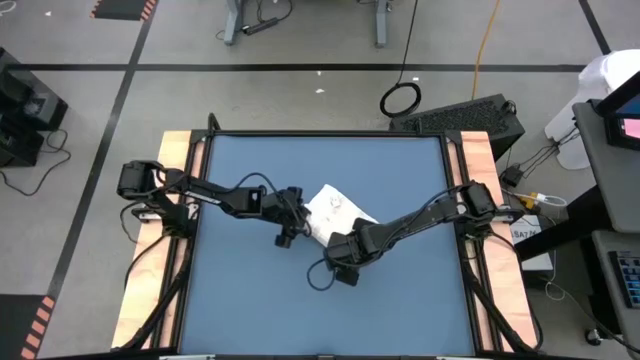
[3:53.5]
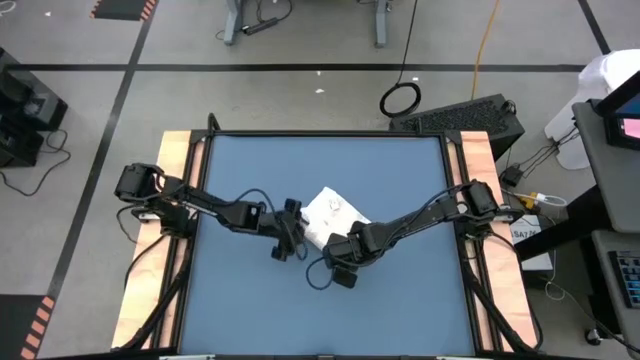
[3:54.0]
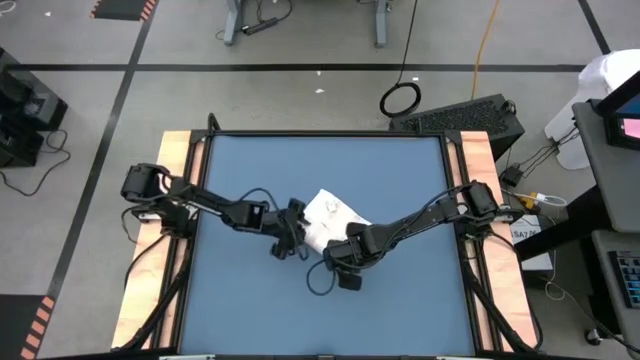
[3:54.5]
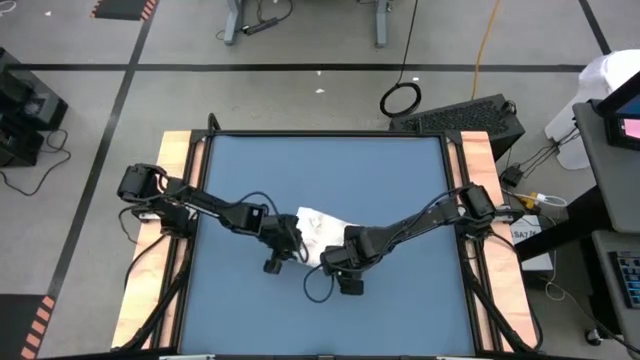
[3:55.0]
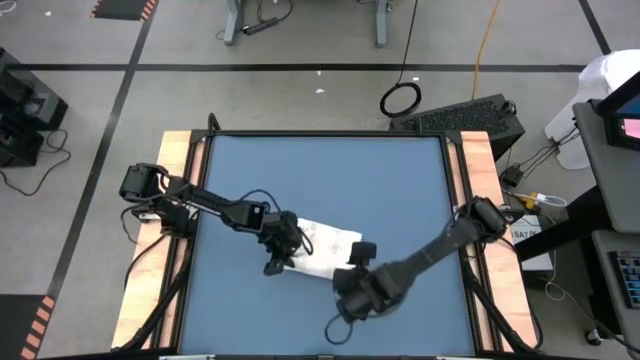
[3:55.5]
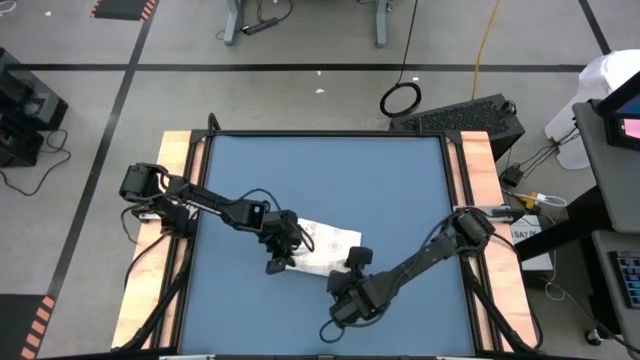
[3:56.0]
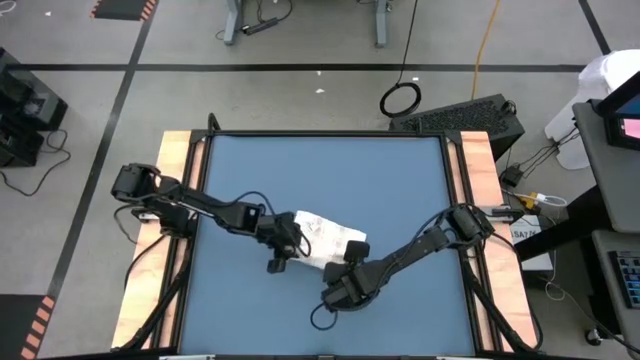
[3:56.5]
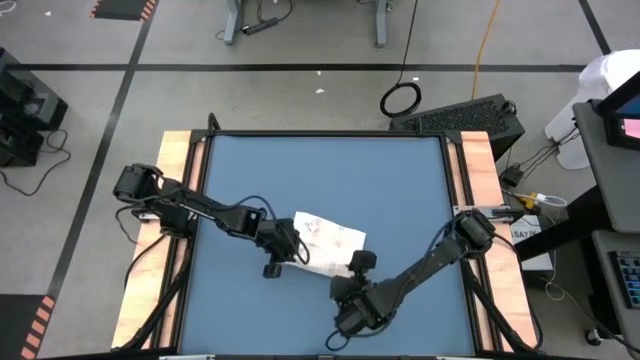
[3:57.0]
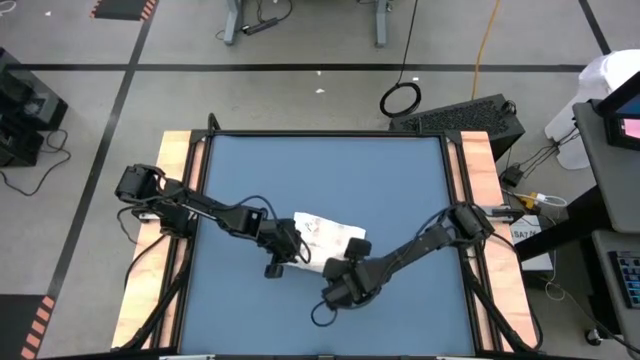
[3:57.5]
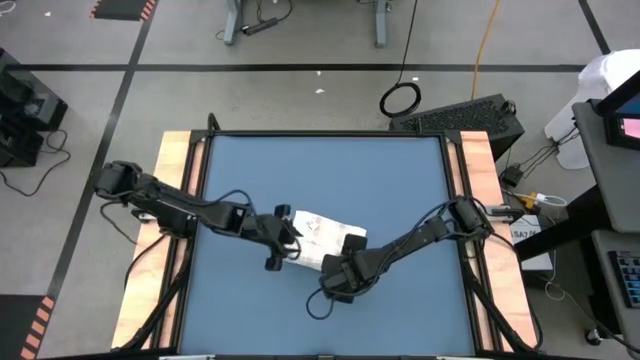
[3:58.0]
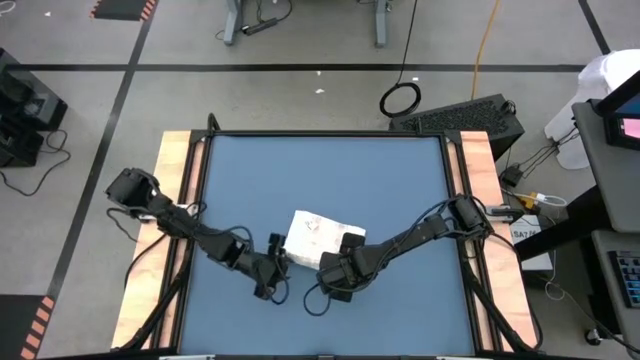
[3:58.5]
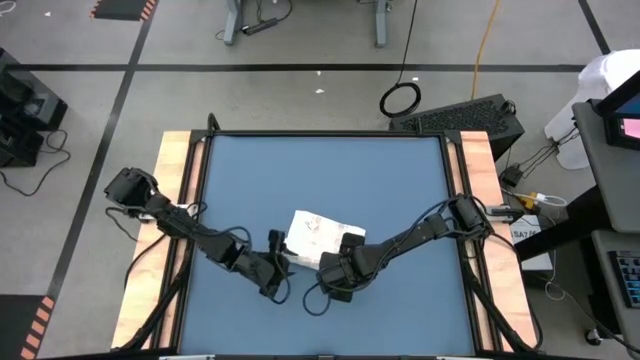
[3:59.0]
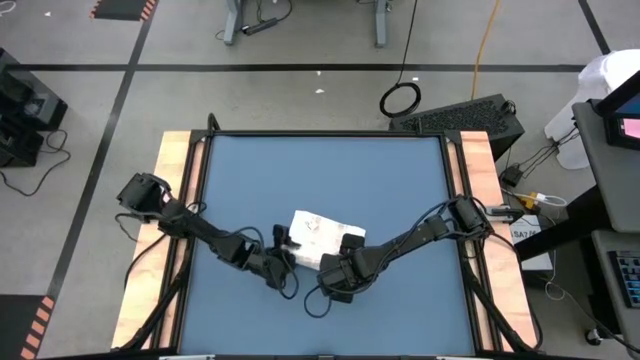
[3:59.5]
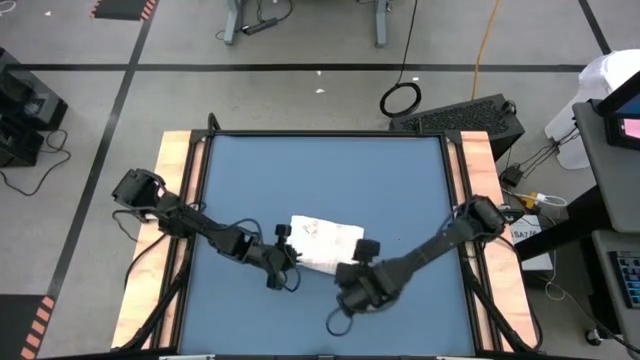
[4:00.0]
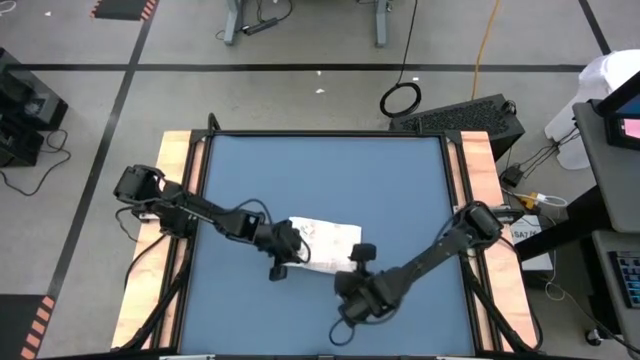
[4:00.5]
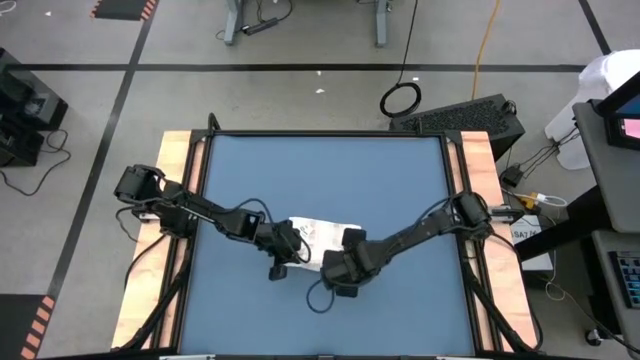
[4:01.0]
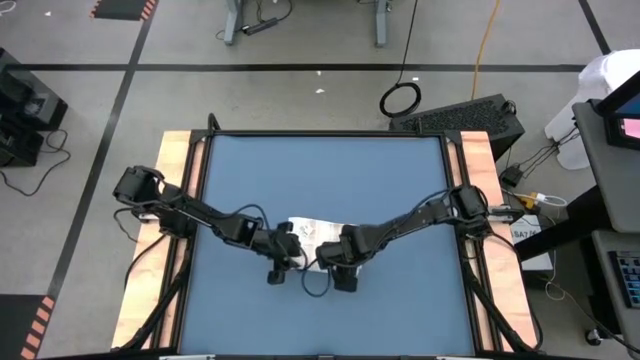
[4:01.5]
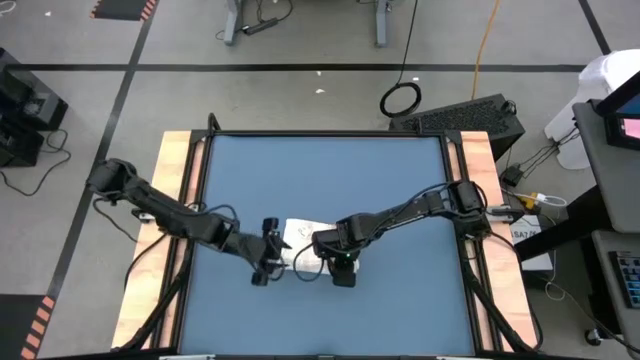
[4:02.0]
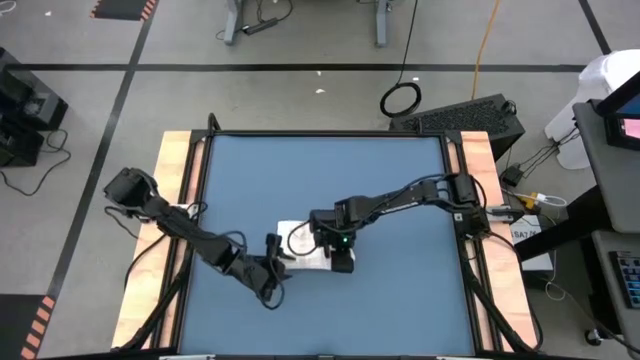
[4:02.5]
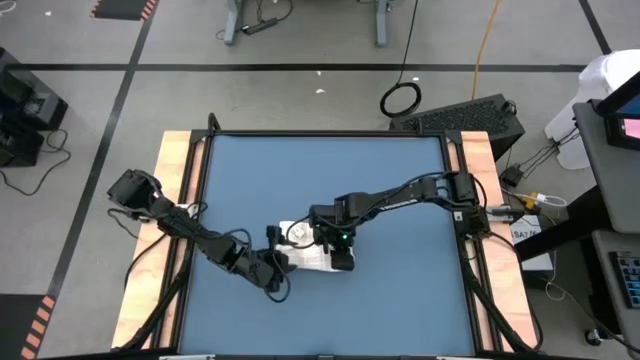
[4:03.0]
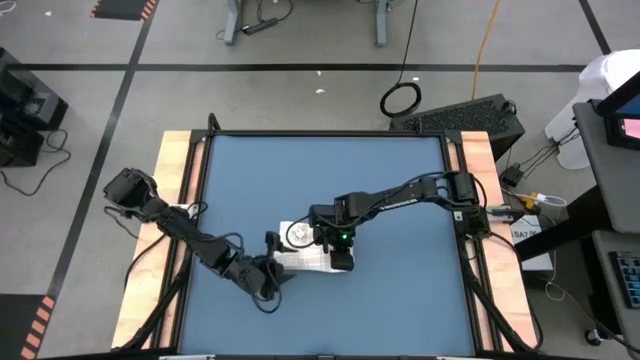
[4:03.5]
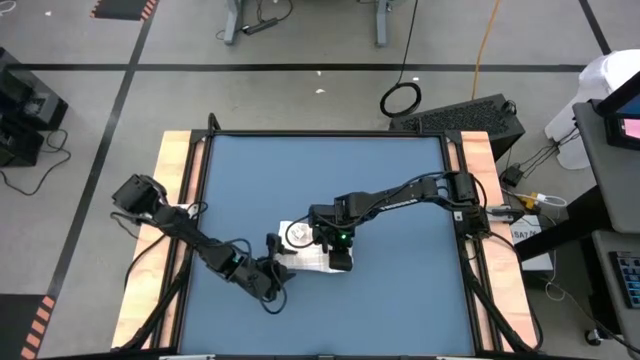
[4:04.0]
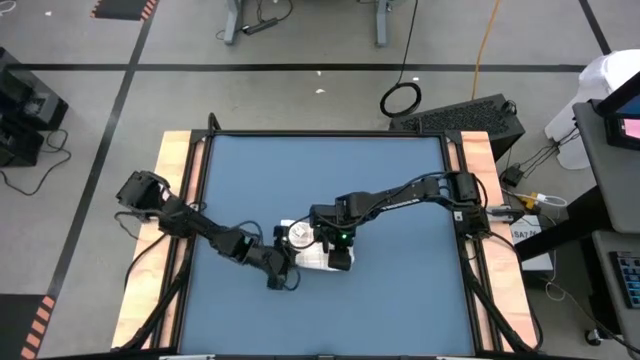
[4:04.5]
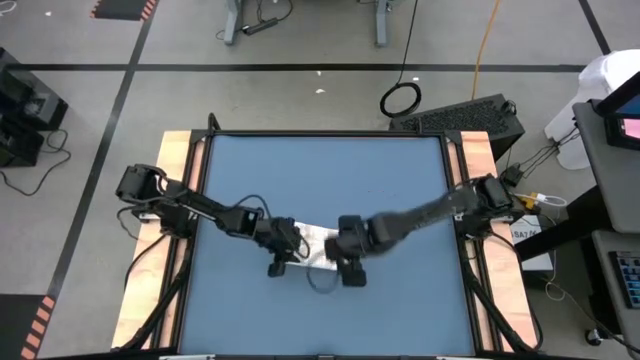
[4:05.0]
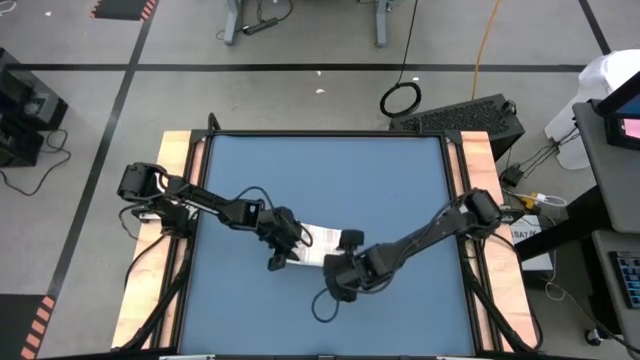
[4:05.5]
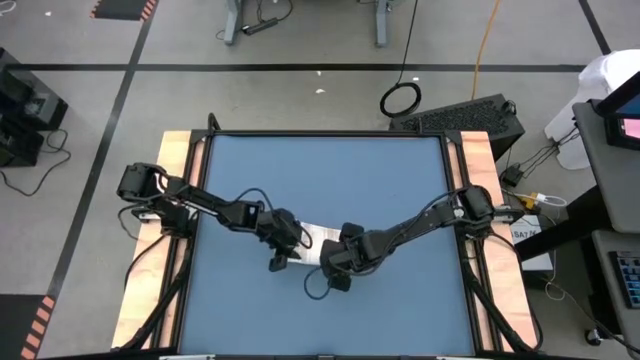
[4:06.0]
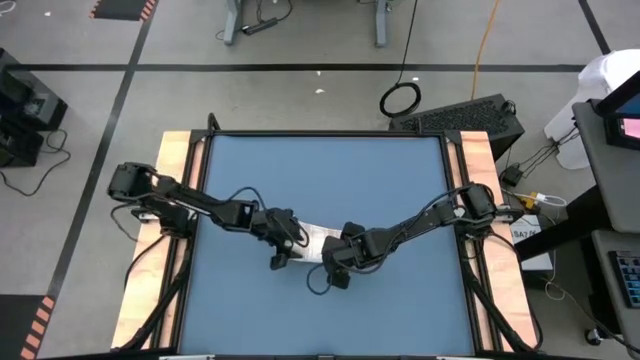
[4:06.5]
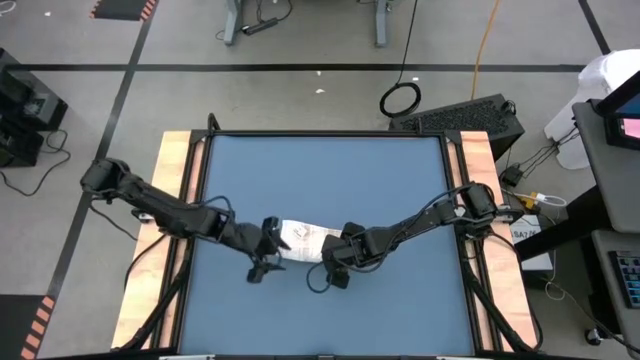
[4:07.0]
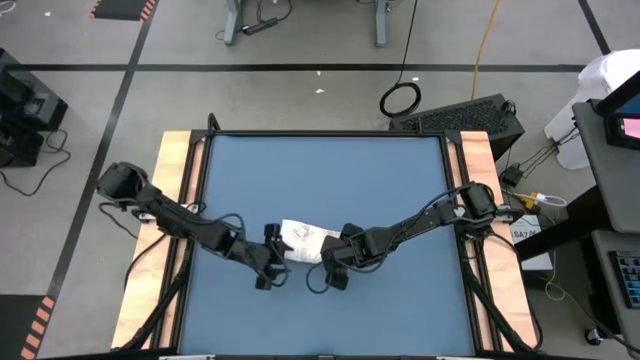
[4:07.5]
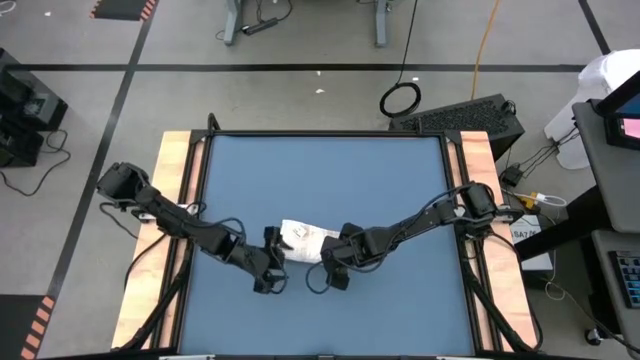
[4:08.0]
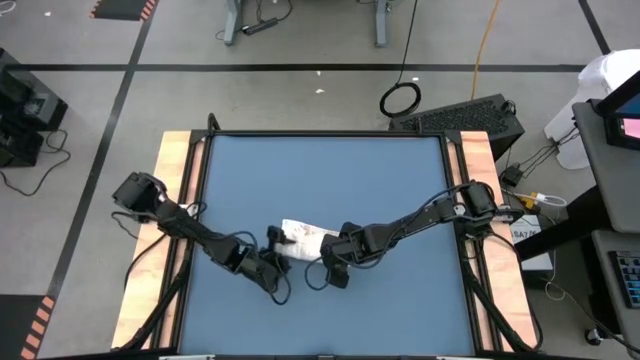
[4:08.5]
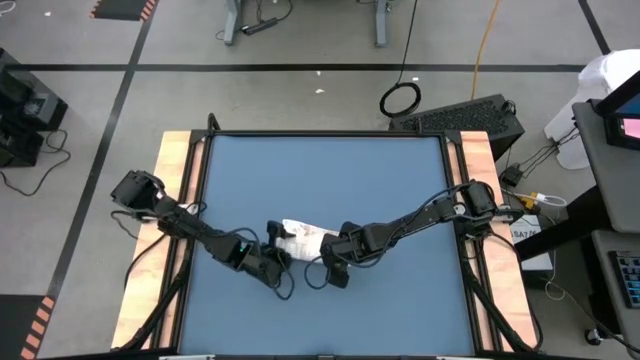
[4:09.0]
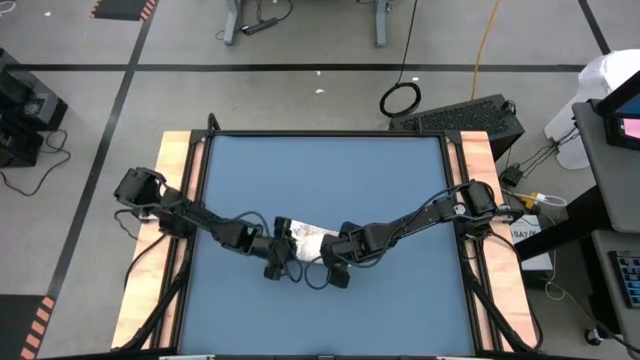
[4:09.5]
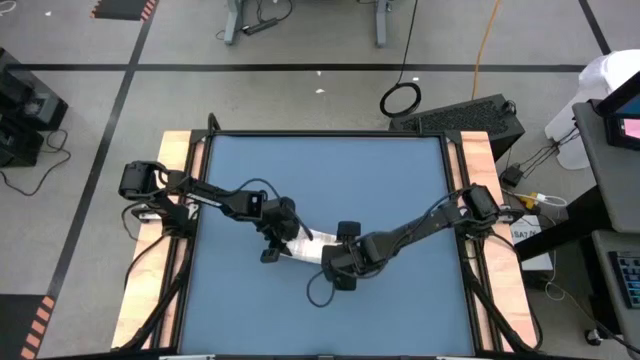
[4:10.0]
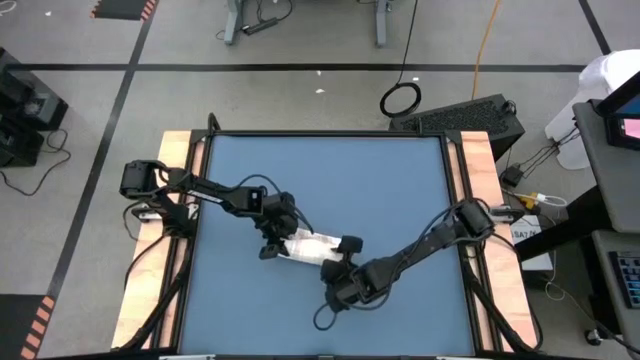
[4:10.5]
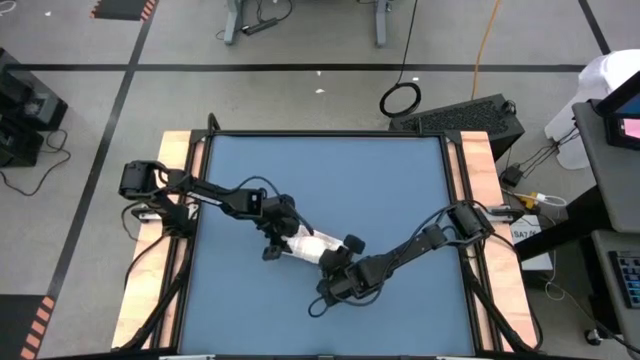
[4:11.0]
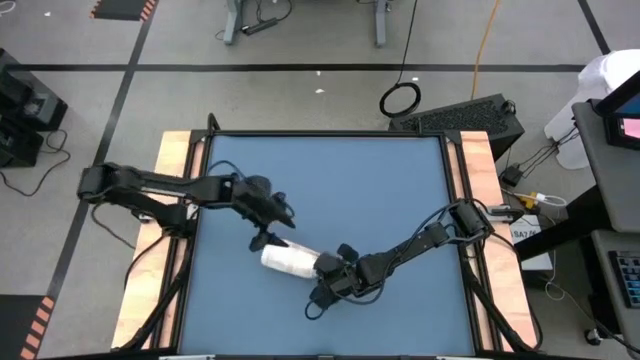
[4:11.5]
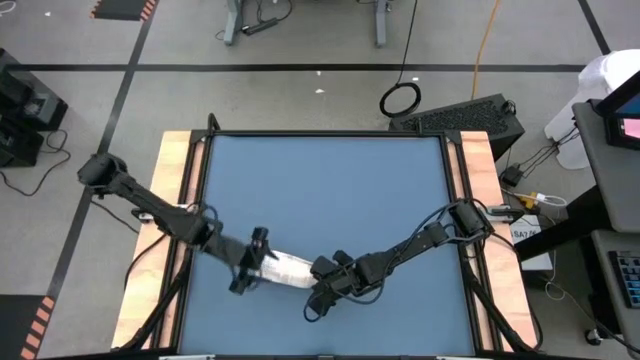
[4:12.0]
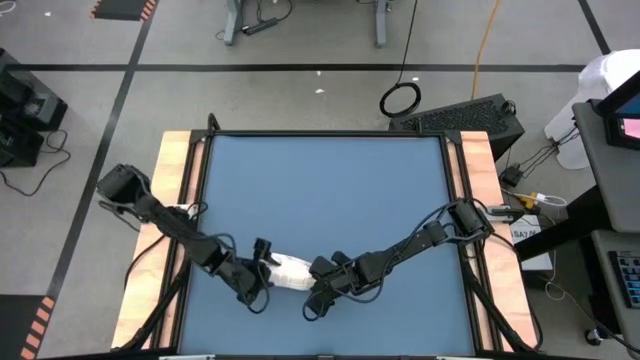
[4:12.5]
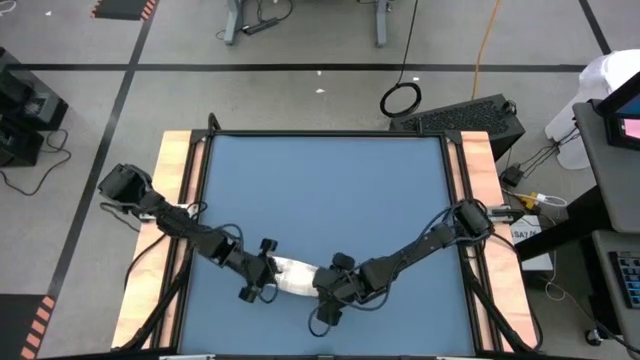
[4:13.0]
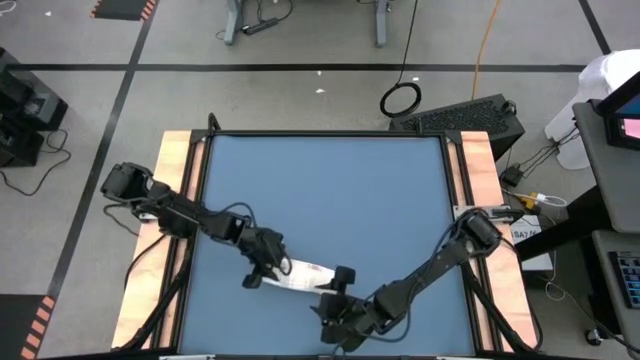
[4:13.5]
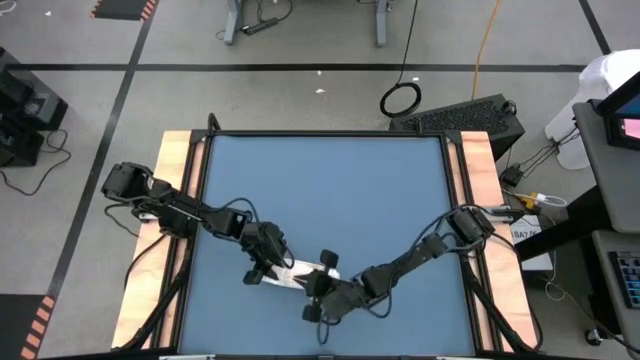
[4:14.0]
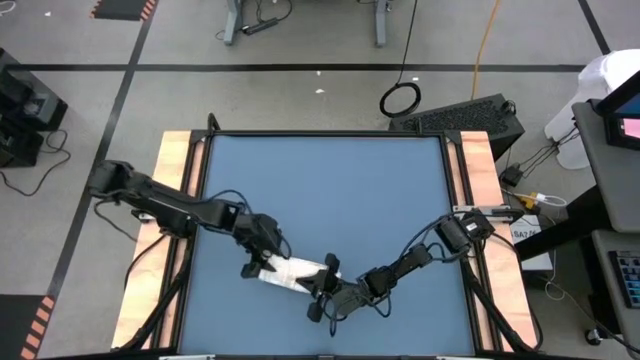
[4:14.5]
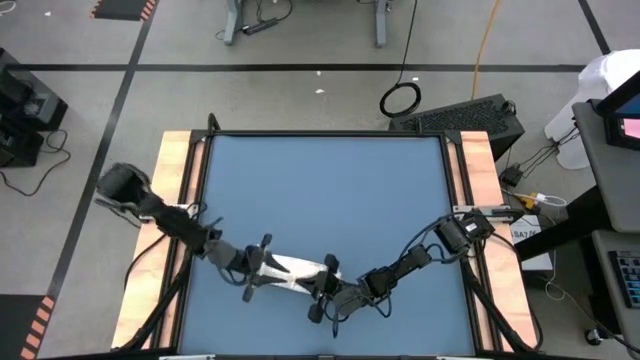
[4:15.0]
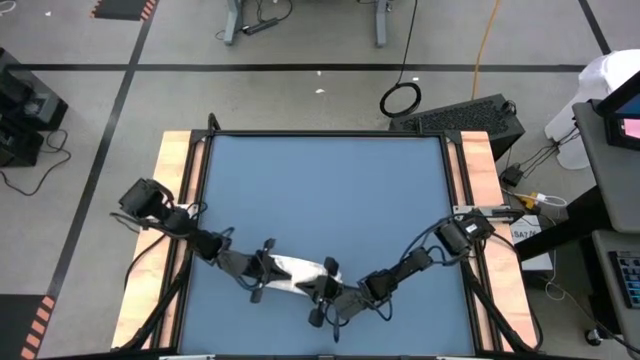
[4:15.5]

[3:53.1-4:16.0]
Task: Roll towel into tight, uniform cylinder
Roll the white towel
